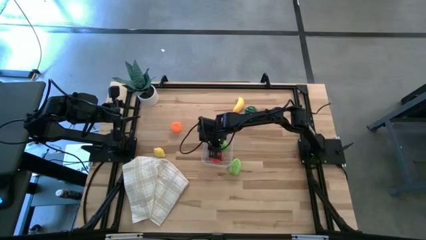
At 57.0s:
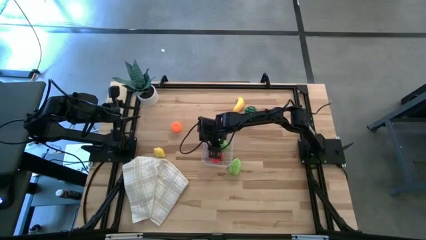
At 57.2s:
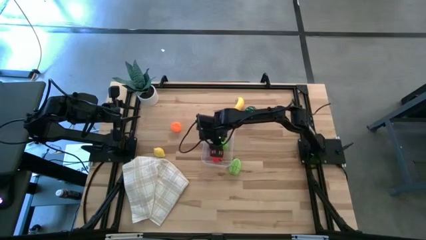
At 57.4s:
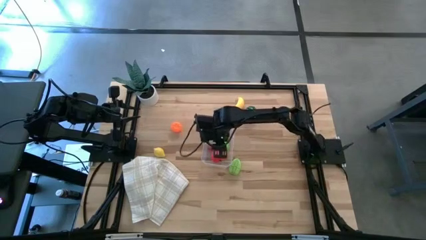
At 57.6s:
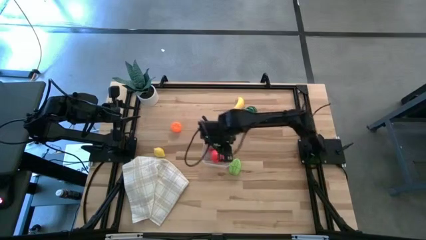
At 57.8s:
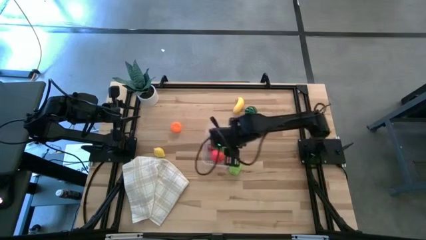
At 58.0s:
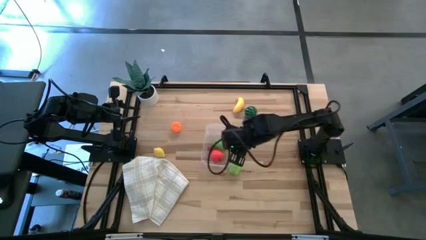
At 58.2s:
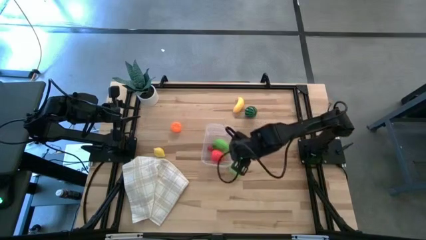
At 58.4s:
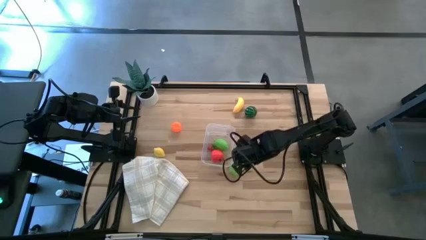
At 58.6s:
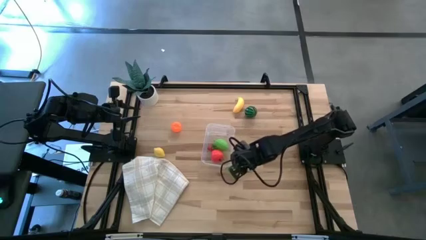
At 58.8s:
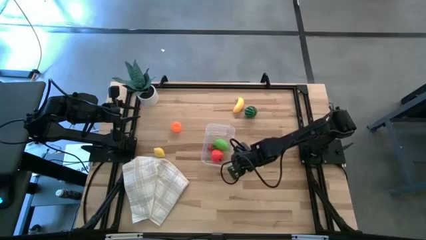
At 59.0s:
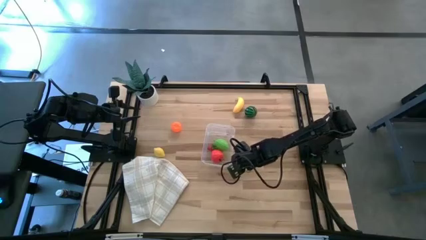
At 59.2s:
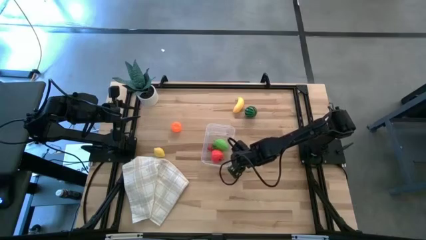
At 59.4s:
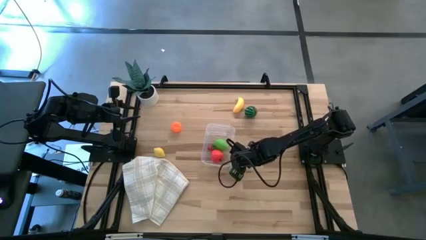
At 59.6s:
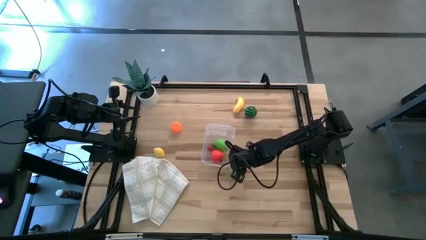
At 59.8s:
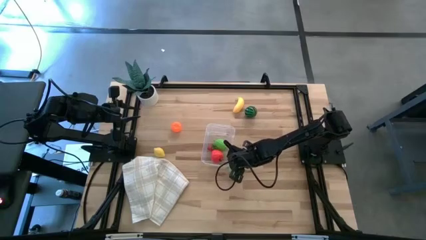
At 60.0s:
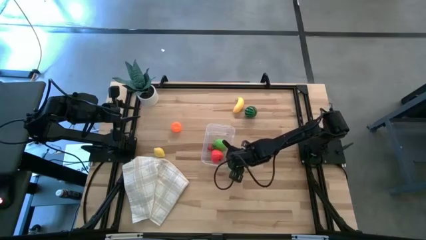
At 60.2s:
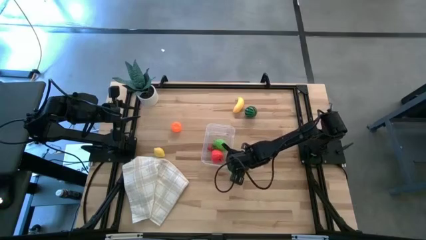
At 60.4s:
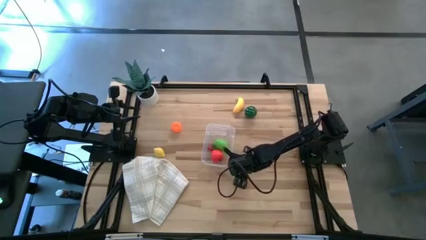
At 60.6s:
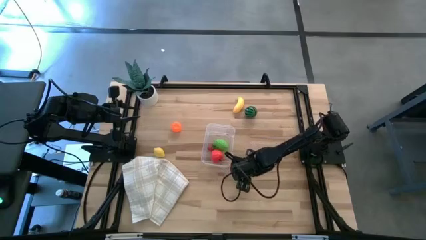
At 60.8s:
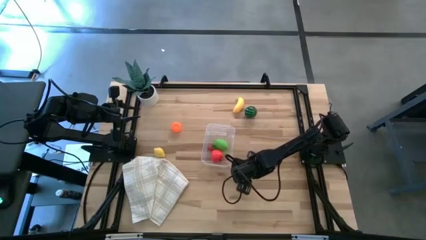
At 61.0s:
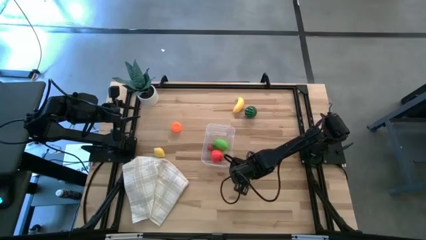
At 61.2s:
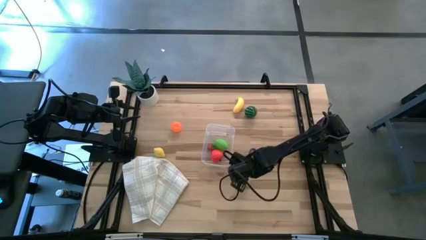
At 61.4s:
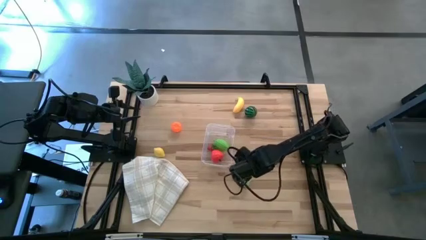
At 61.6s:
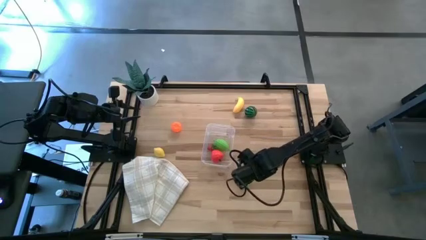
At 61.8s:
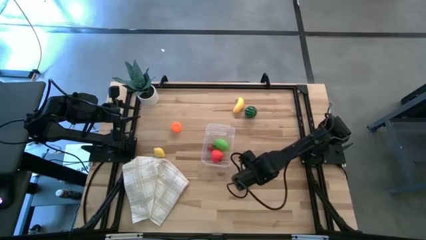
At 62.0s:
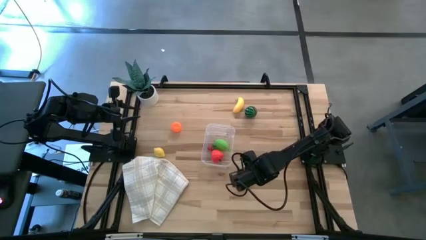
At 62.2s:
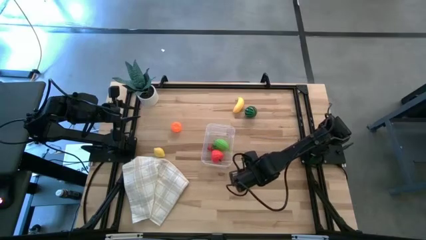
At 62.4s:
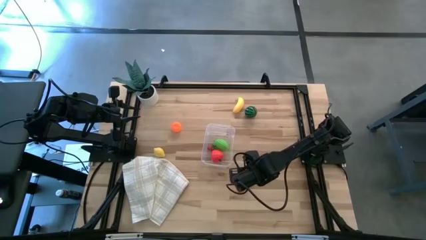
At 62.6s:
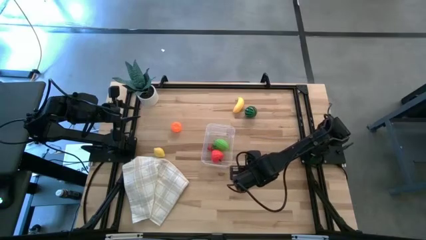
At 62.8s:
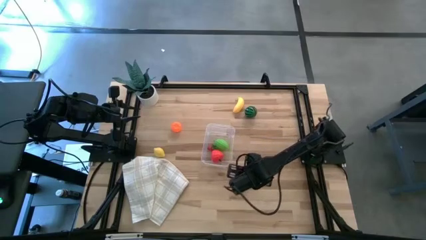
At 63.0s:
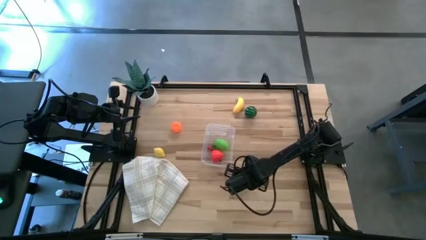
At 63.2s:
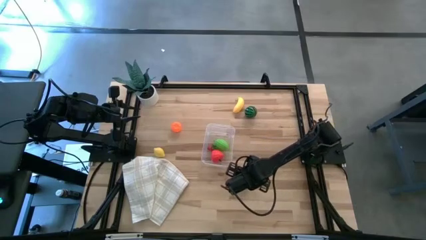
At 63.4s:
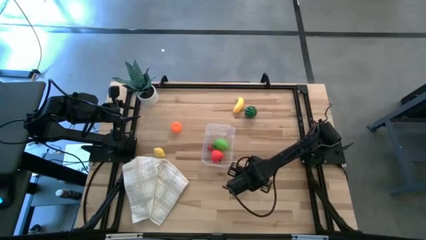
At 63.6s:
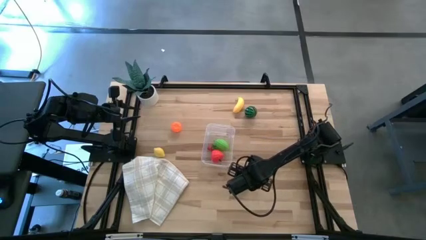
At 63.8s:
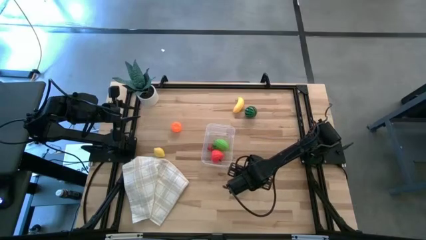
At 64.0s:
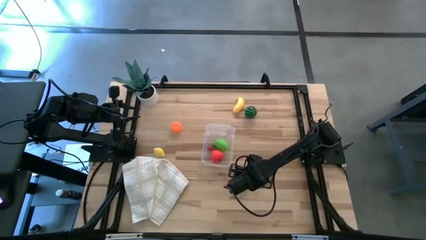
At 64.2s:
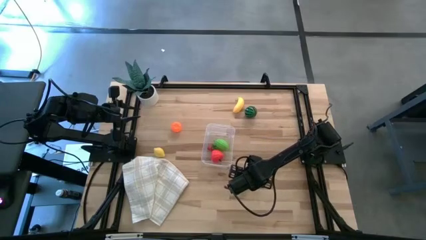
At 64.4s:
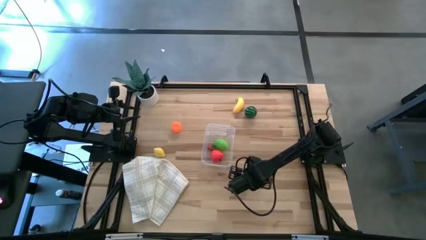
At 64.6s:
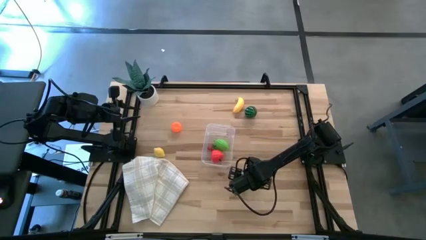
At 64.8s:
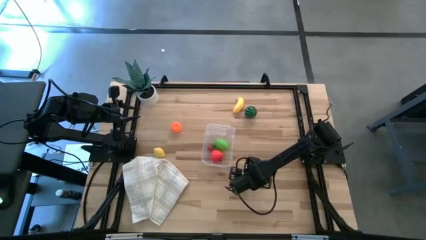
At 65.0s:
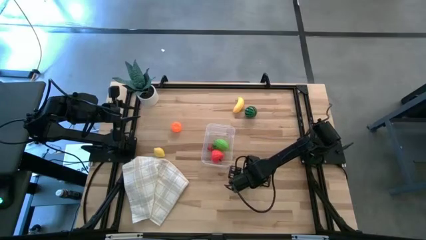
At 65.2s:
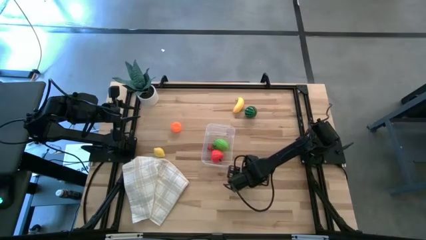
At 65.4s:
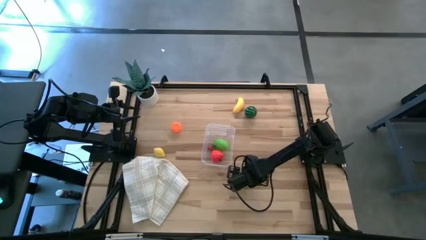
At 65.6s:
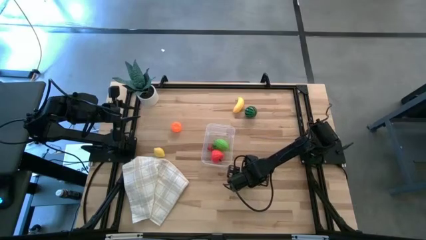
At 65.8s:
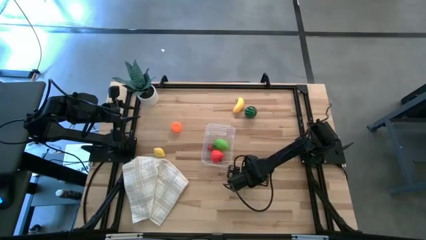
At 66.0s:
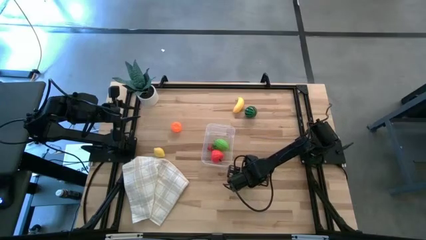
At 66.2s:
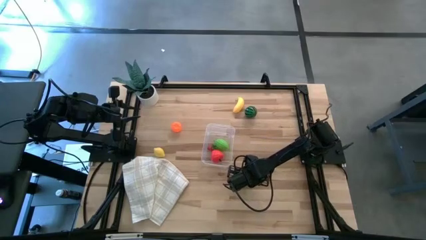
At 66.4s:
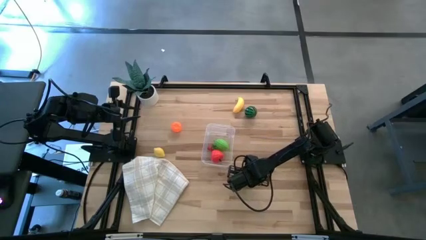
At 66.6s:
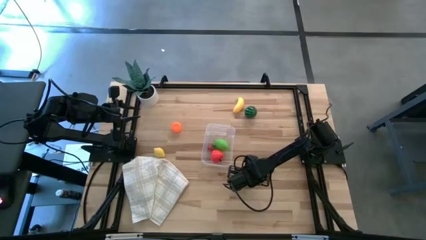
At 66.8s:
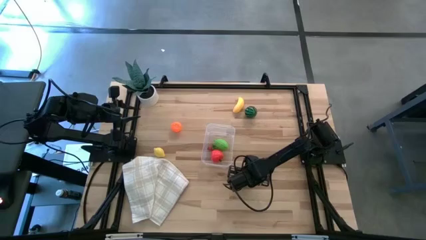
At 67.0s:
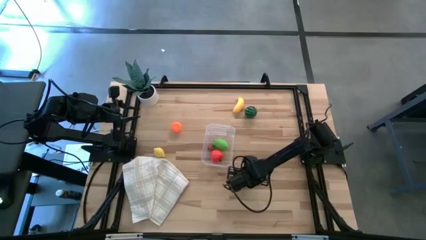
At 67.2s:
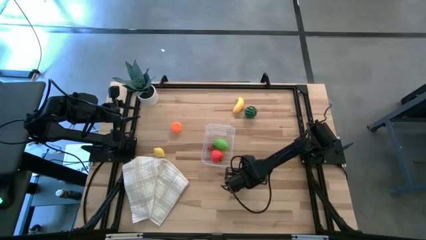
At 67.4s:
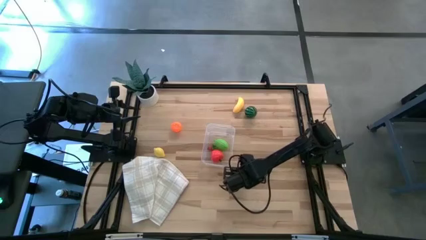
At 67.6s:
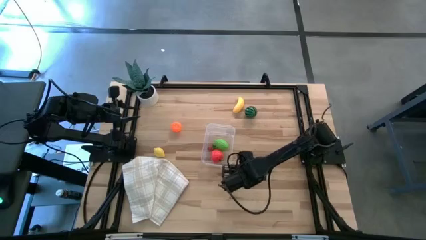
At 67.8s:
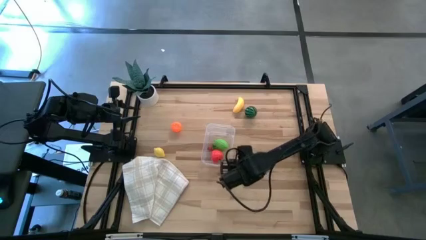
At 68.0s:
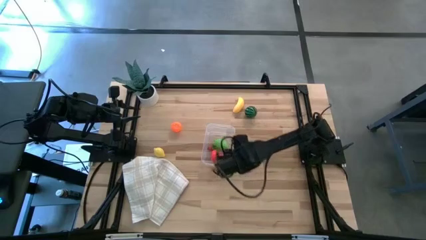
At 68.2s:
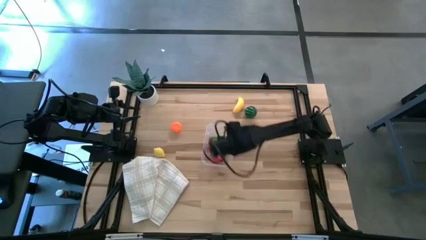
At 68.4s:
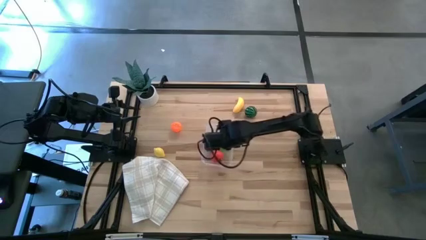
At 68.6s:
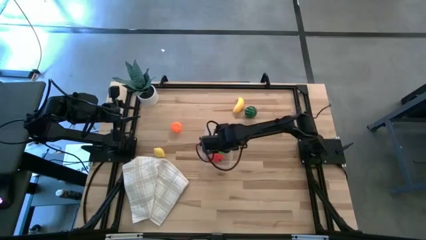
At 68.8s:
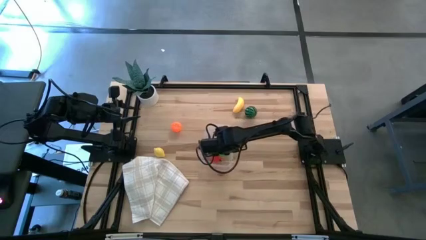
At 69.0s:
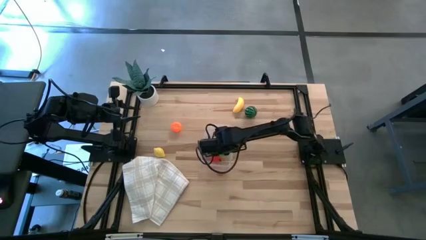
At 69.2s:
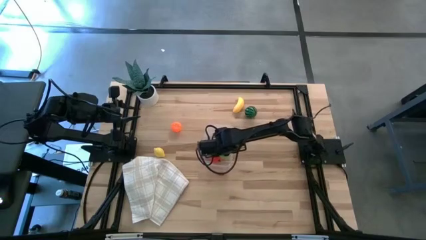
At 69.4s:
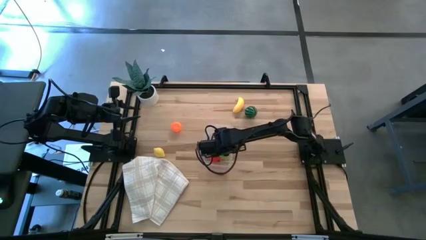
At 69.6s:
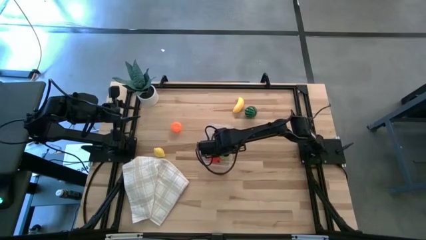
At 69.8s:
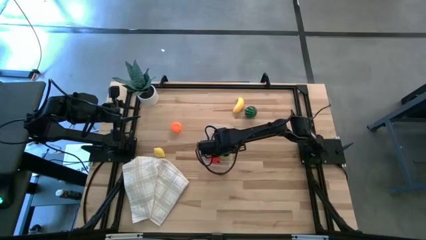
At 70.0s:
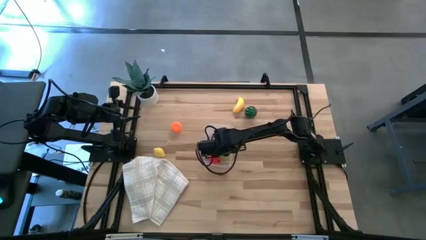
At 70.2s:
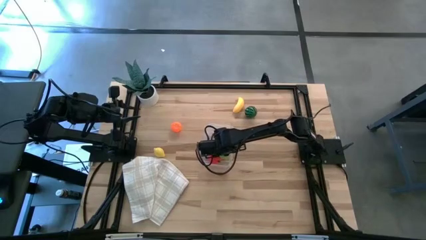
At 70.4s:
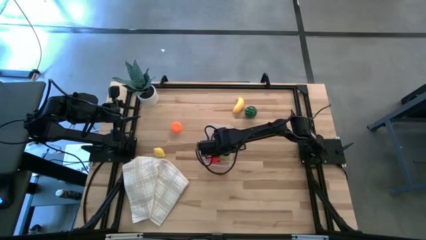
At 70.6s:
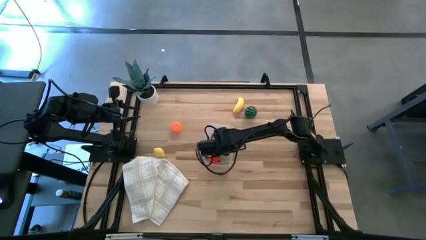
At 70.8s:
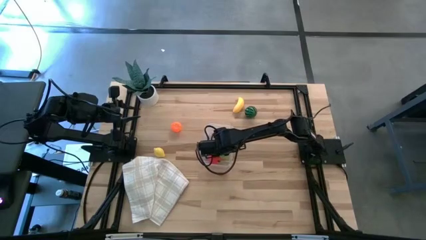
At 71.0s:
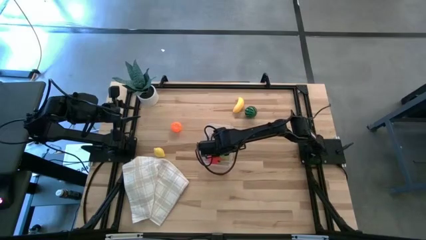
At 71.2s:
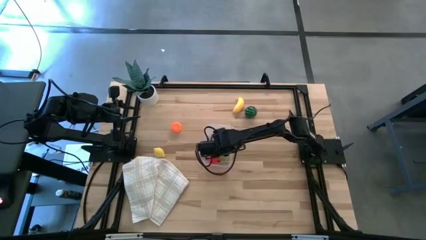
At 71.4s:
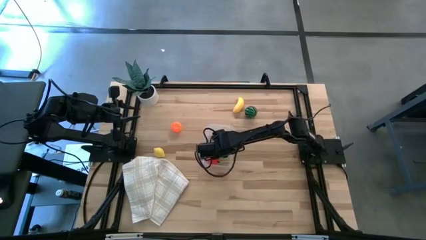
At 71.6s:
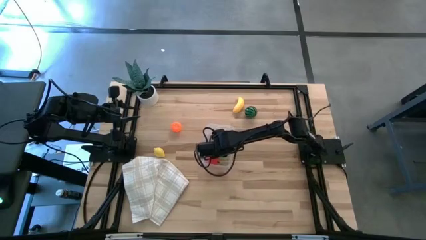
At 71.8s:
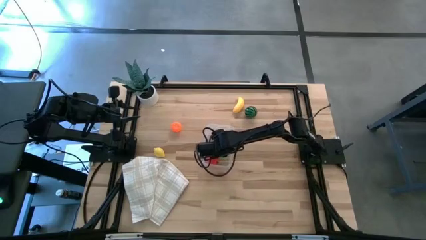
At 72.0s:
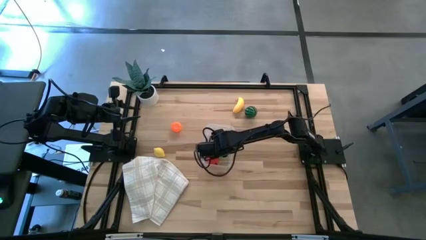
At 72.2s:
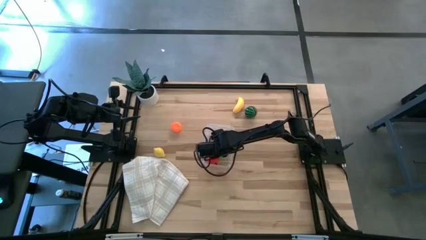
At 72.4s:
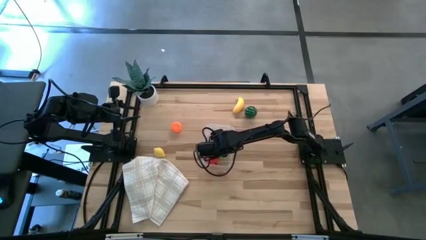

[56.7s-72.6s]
Task: Pick and placing Produce into tupperware
Put the starfruit into the transparent bin
